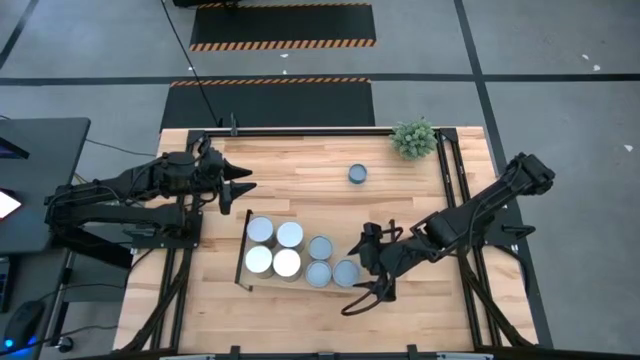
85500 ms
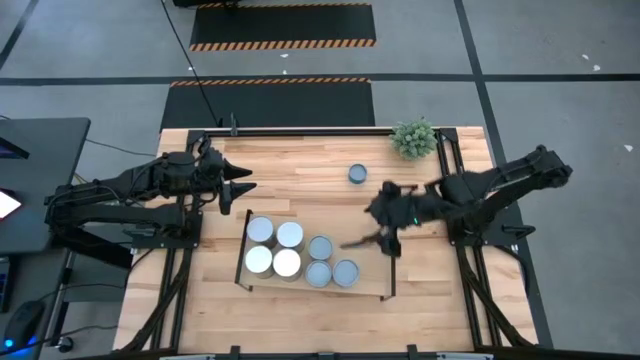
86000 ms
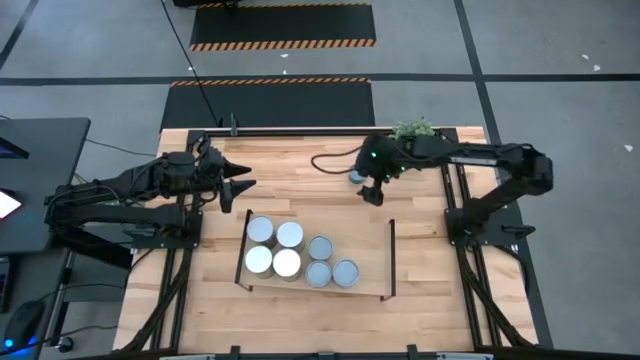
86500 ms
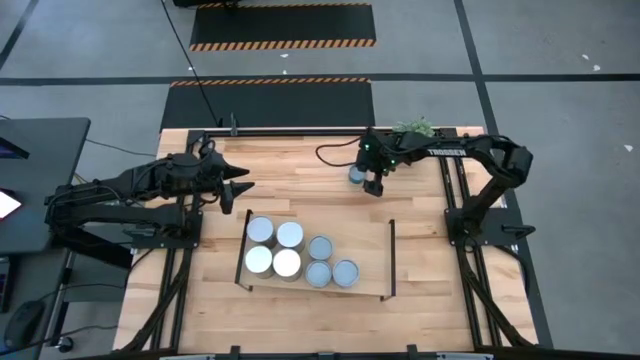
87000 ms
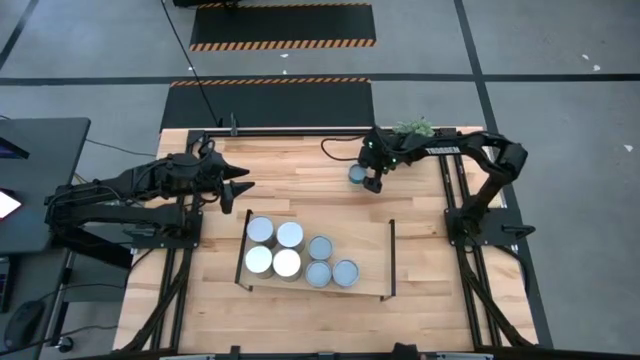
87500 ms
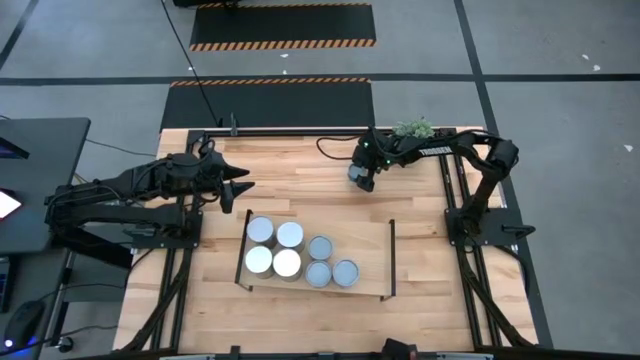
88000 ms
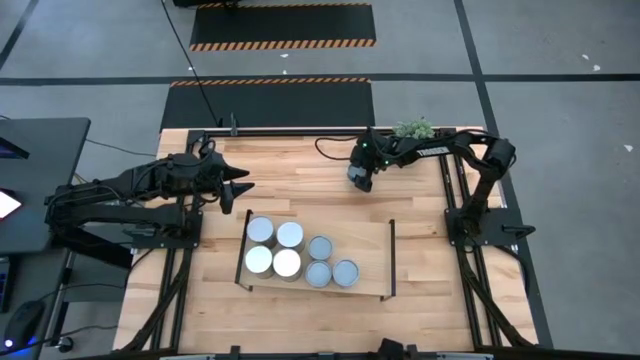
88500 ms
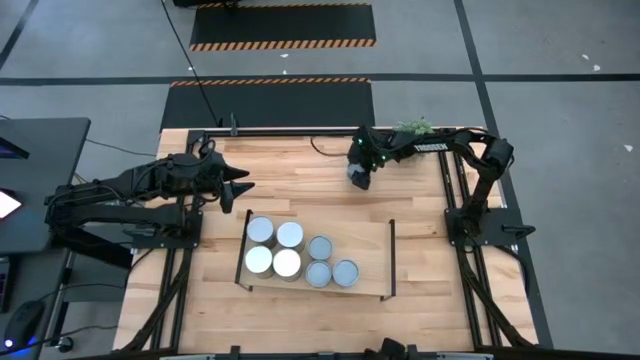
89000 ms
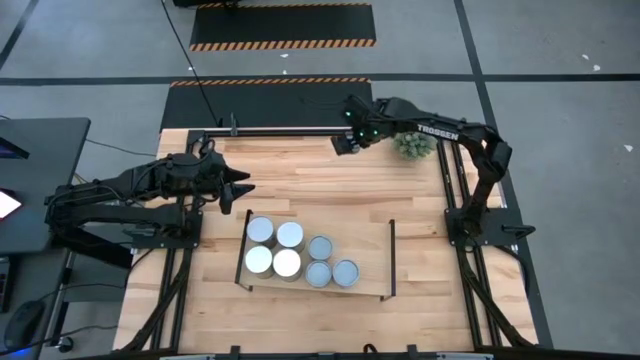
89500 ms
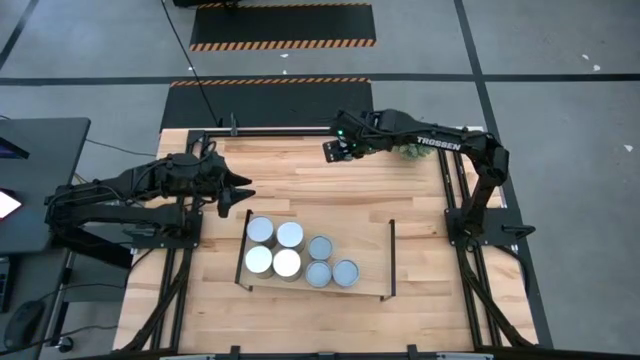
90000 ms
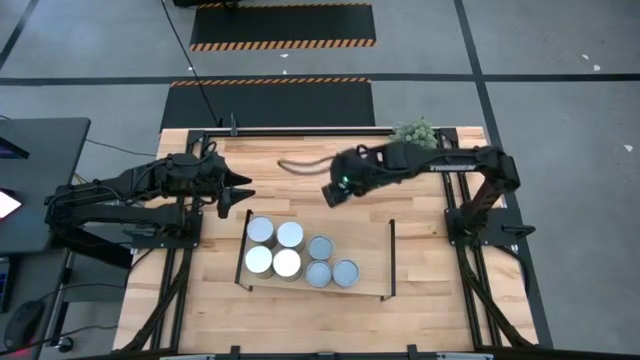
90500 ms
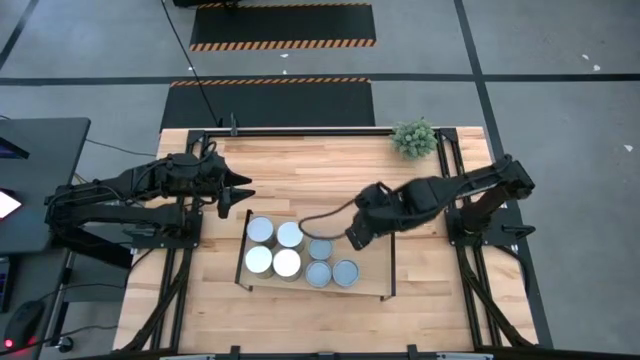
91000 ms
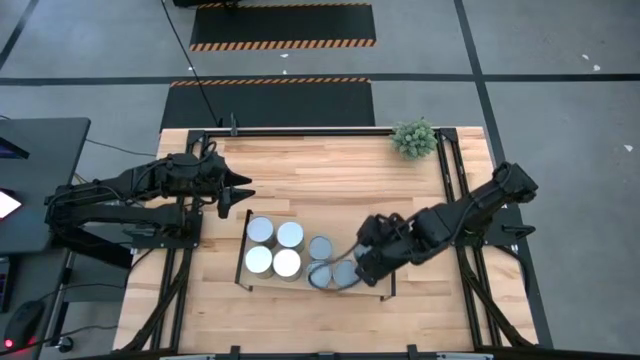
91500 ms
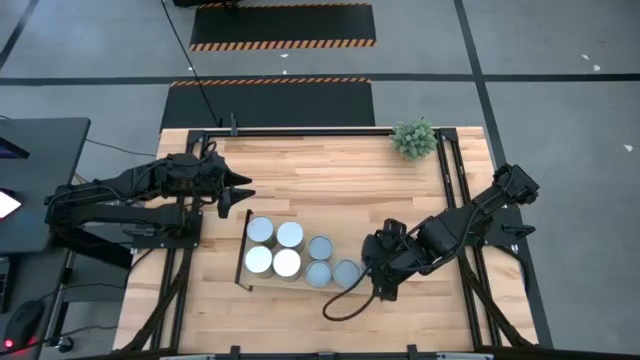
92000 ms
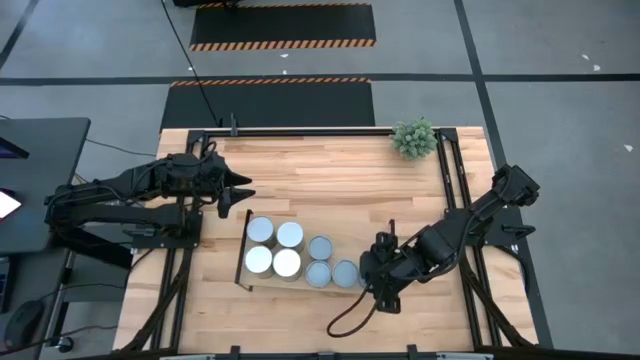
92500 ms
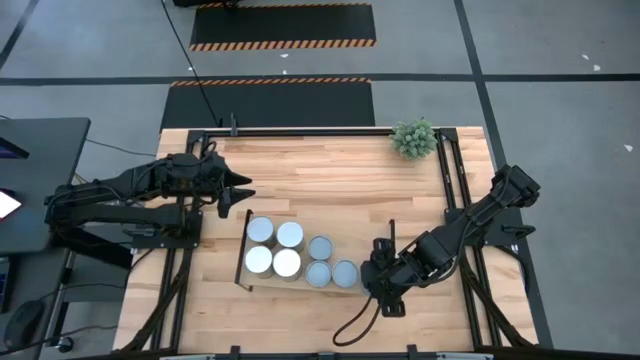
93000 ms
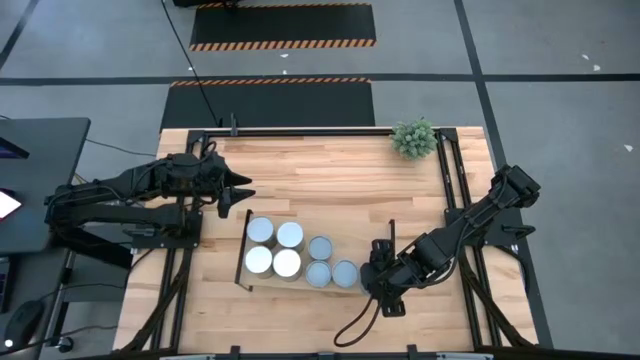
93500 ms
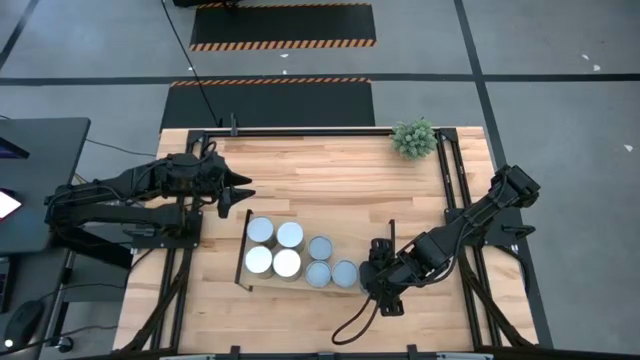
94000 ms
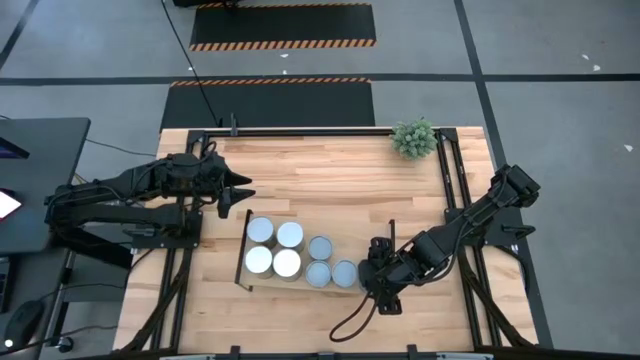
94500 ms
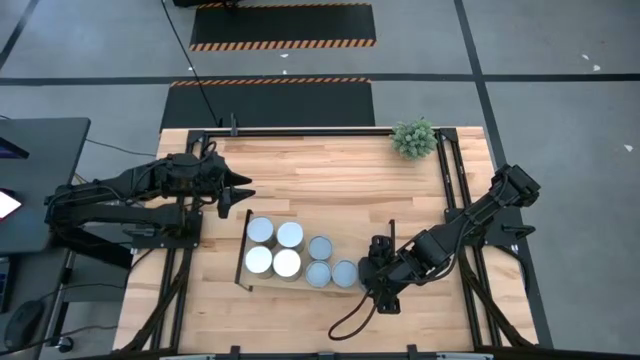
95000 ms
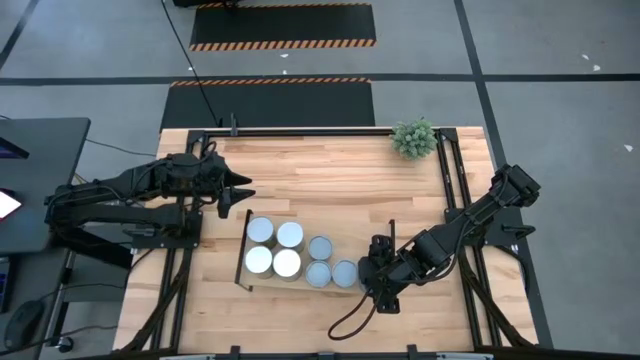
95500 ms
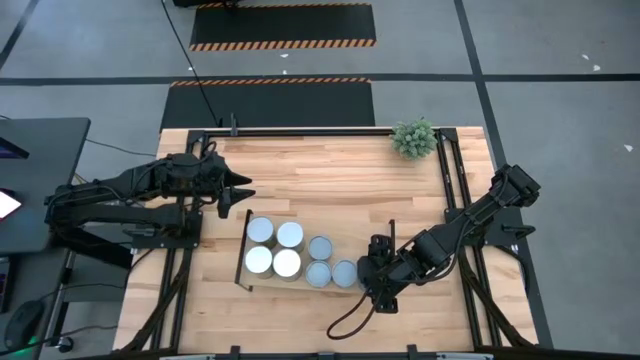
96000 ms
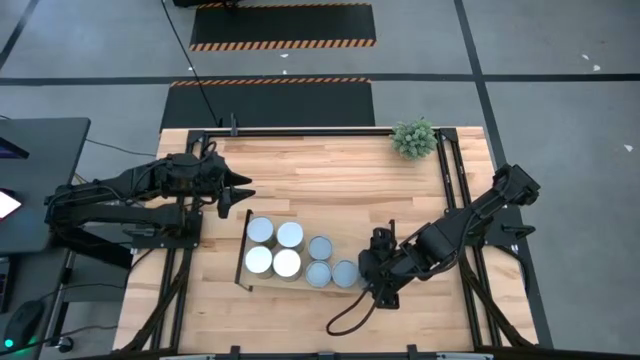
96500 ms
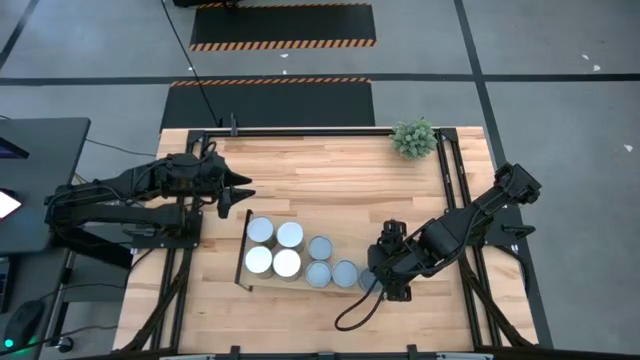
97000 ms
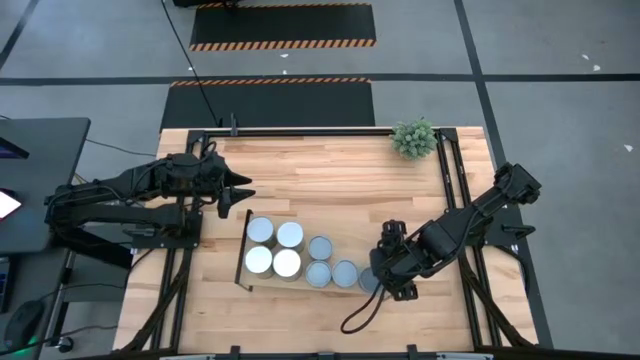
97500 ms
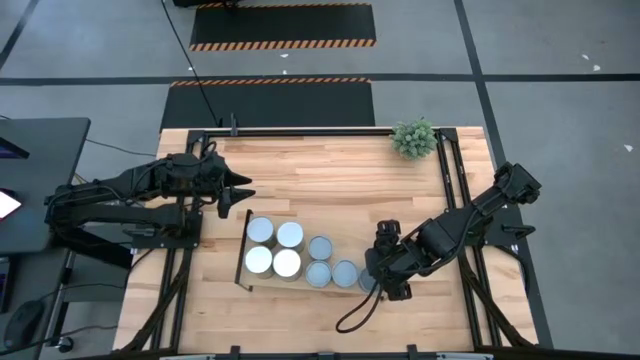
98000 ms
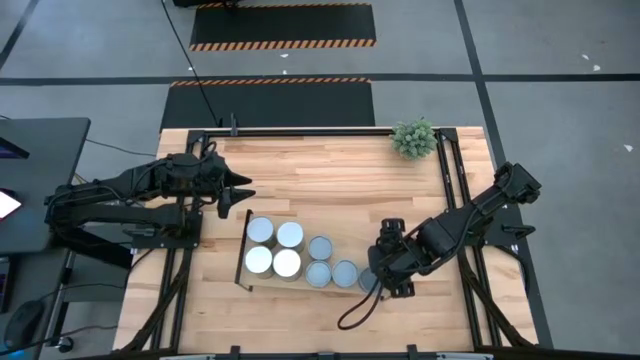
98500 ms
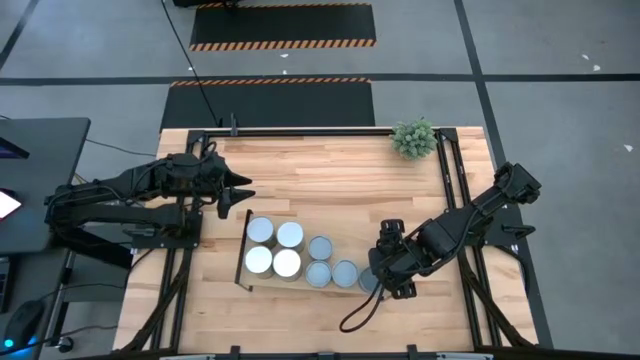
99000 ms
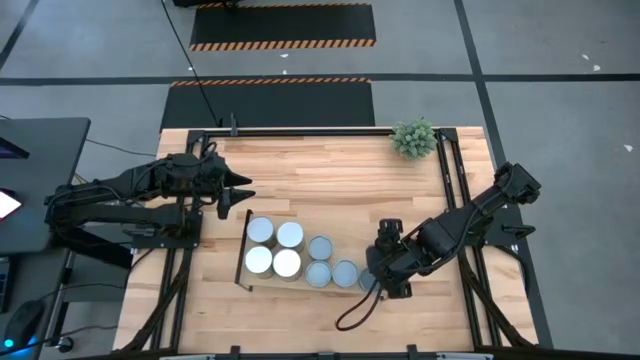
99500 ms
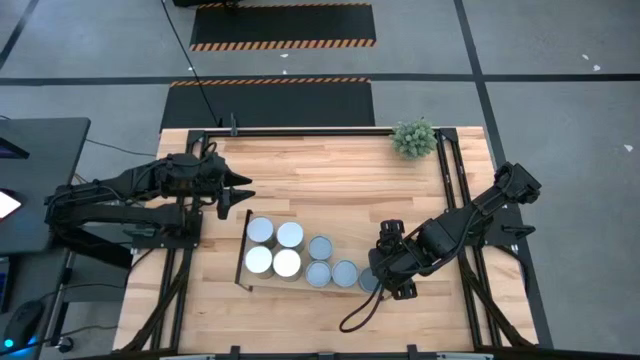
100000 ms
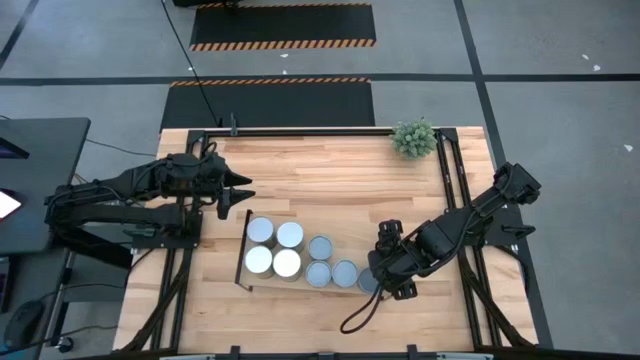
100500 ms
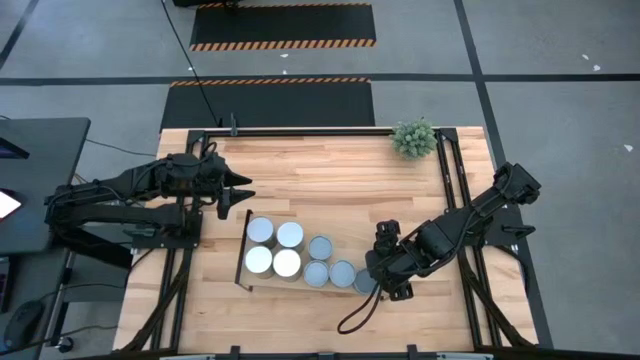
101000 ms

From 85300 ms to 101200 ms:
Task: Pick and place cans onto a shelf
Put the blue canned on the shelf

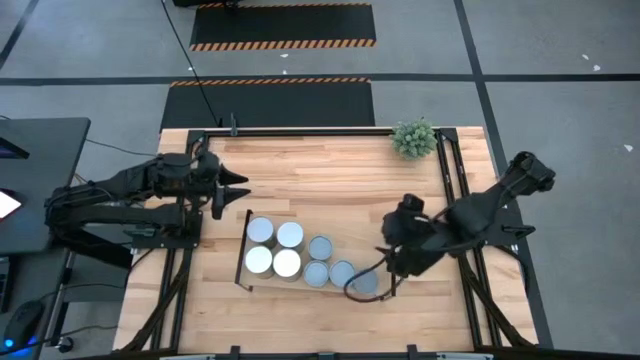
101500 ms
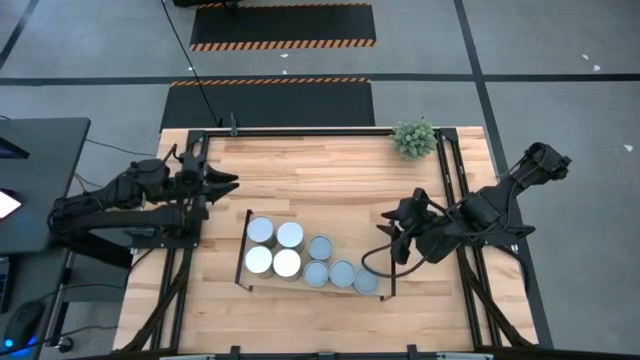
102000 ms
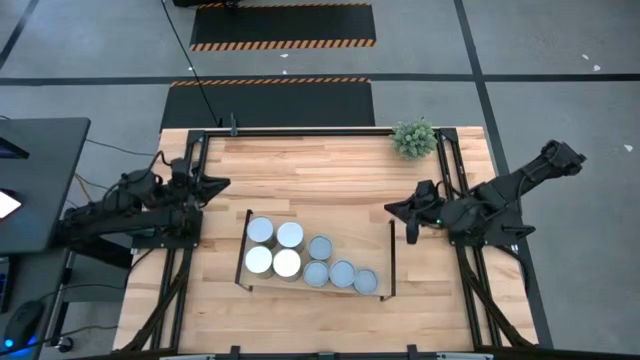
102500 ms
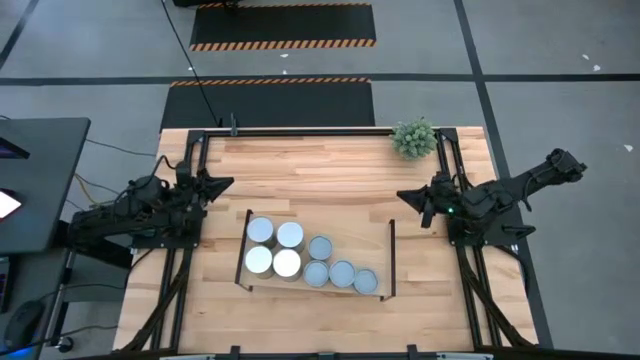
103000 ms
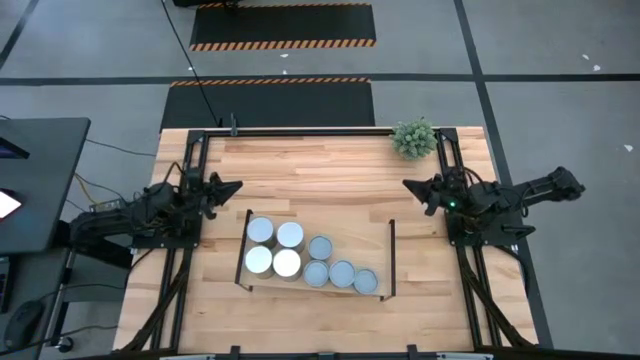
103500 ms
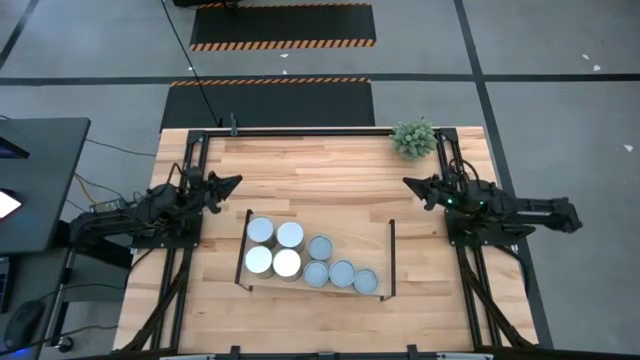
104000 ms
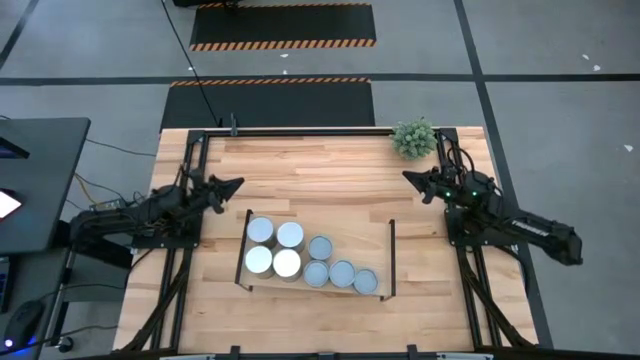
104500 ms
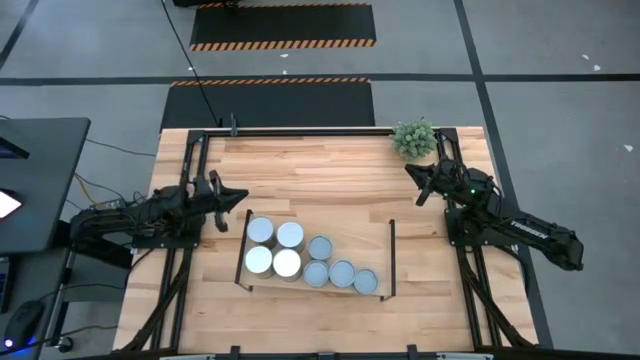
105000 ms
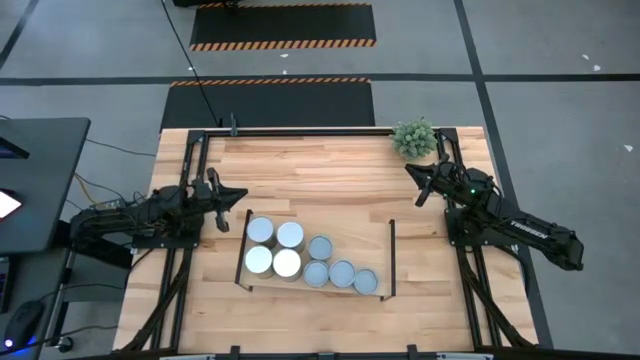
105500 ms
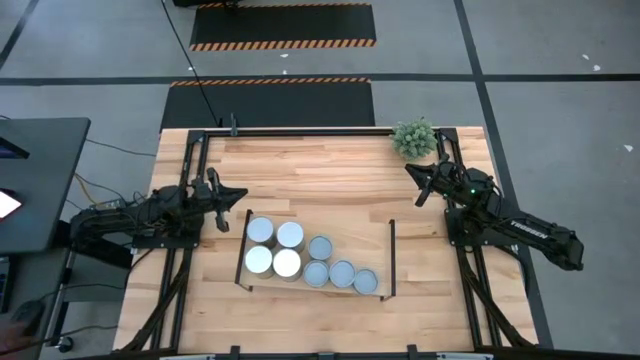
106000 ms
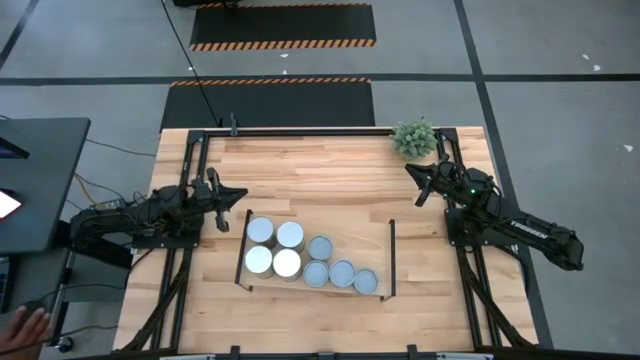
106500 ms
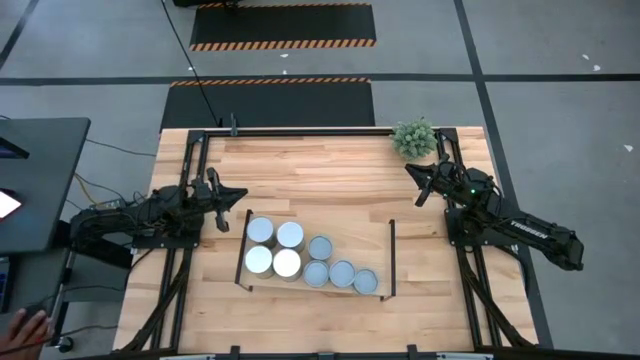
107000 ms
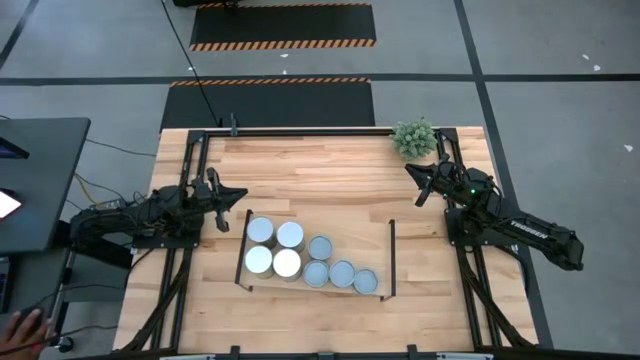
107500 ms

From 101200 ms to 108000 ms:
Return to Home Position
